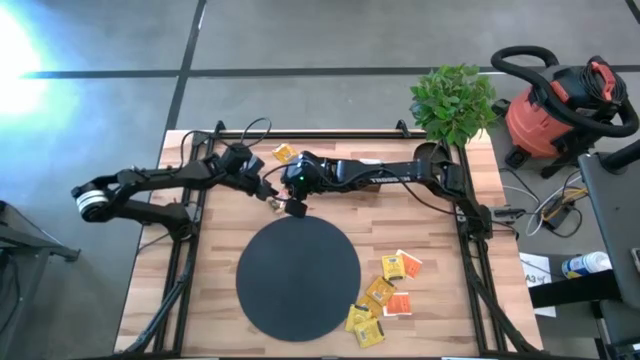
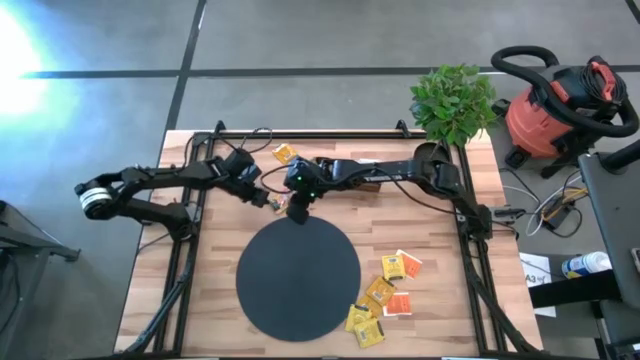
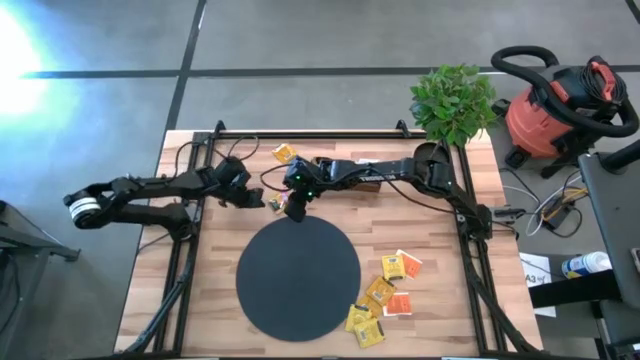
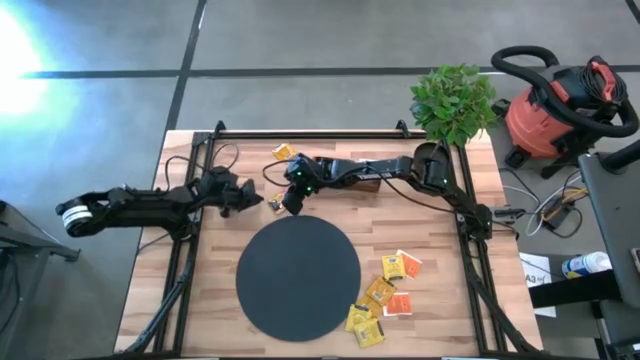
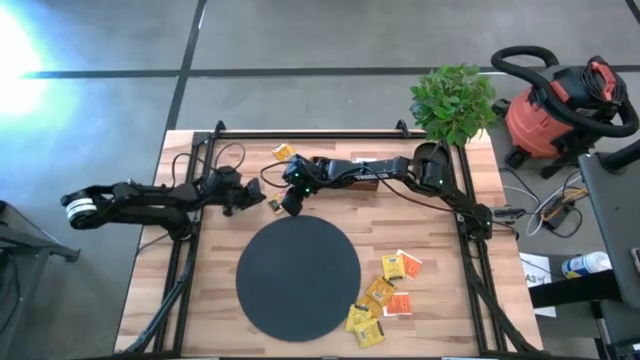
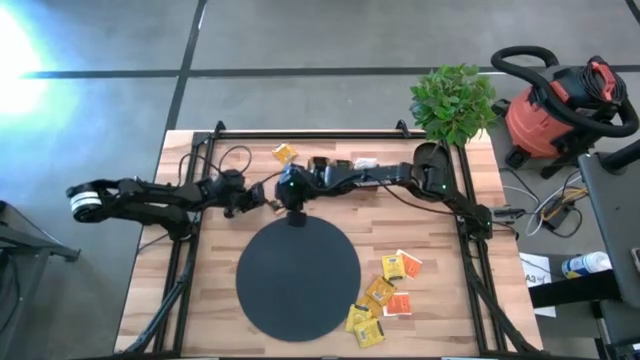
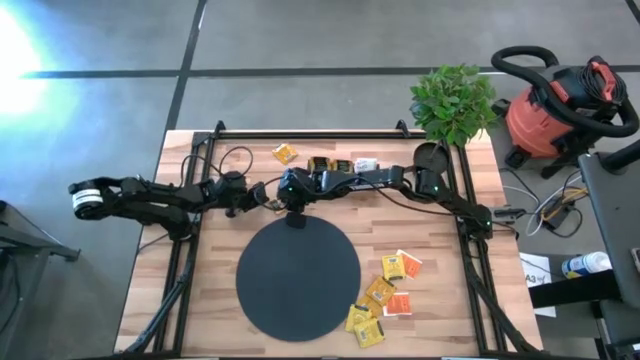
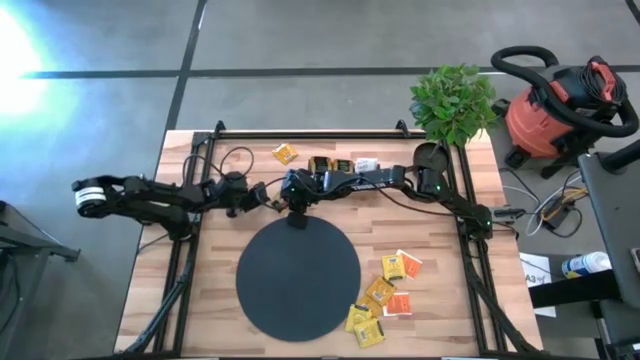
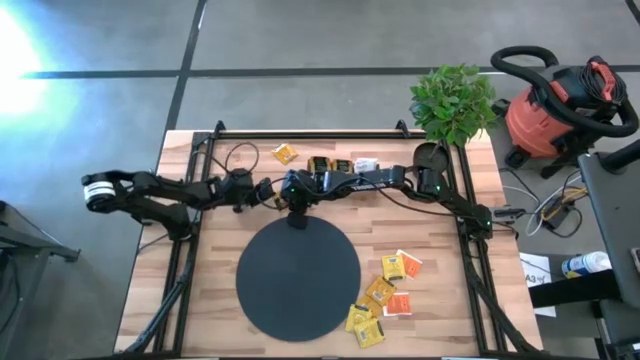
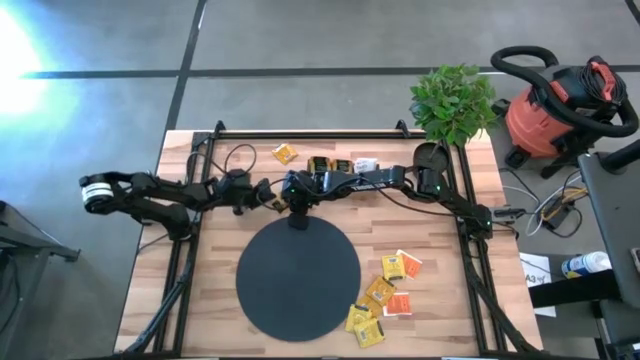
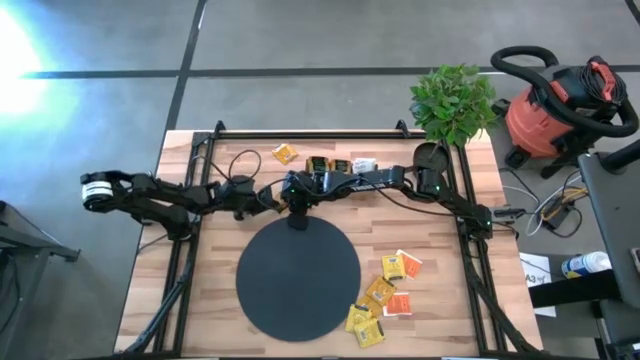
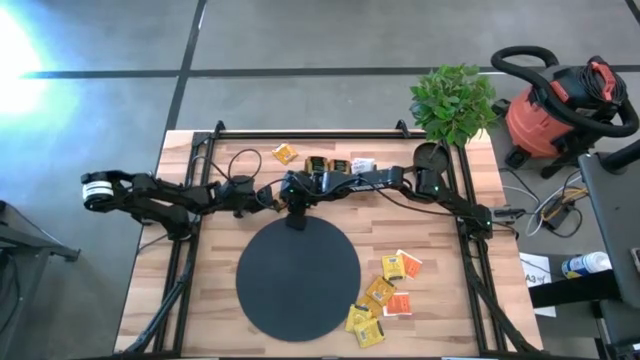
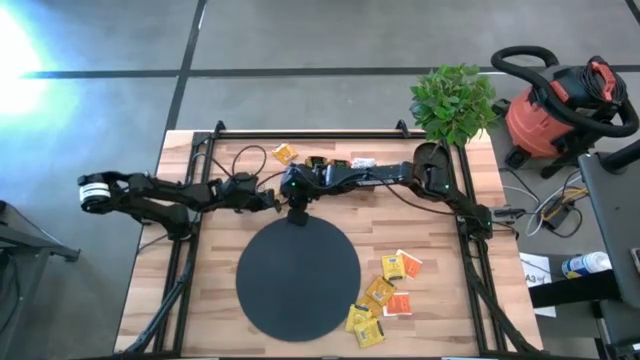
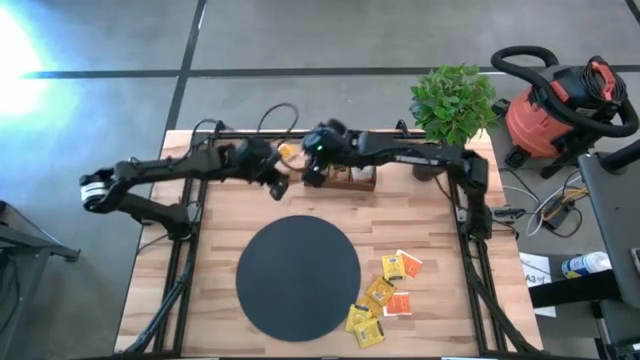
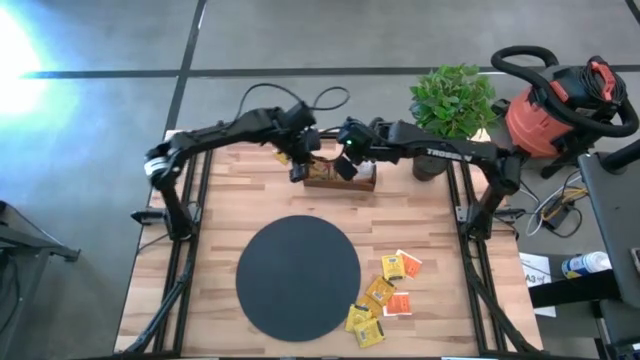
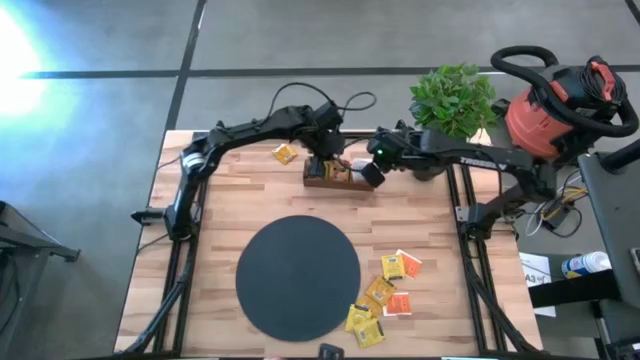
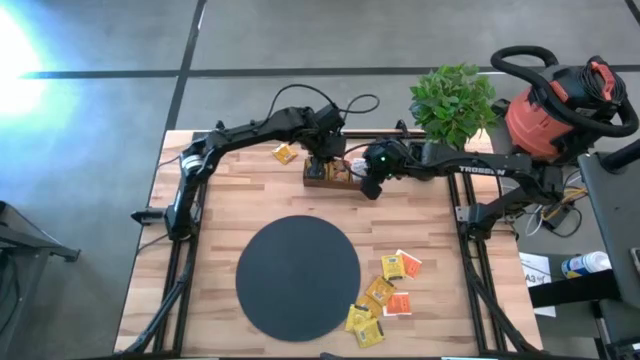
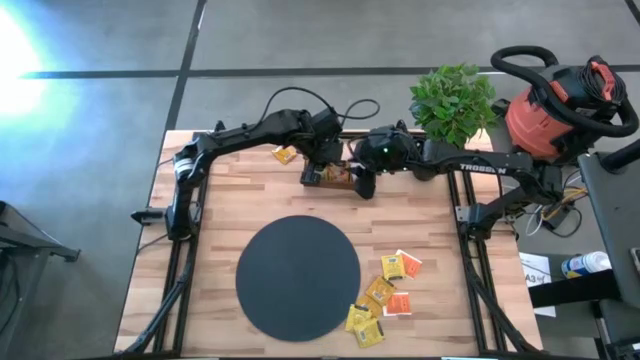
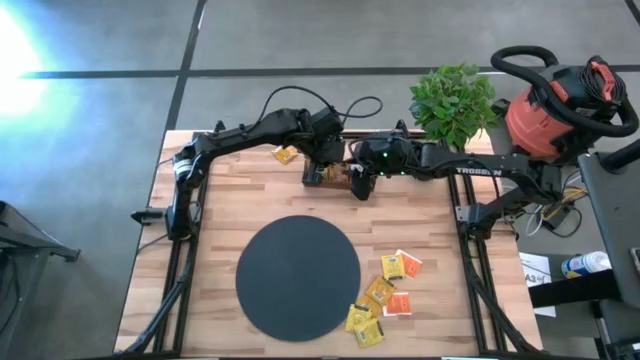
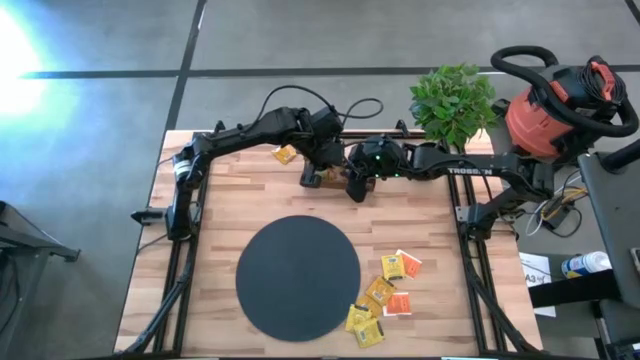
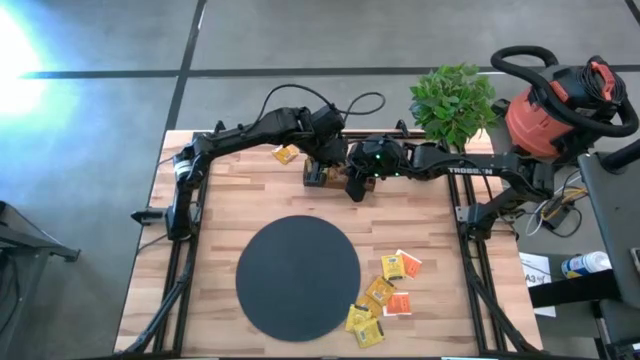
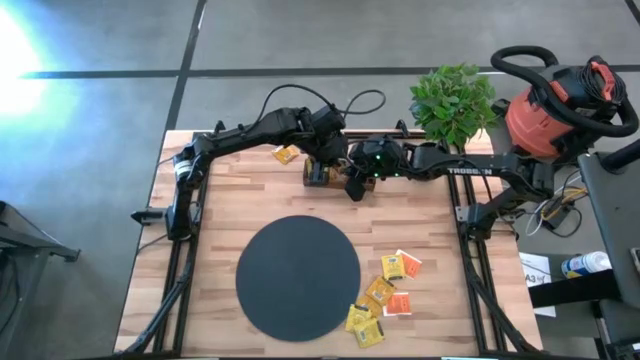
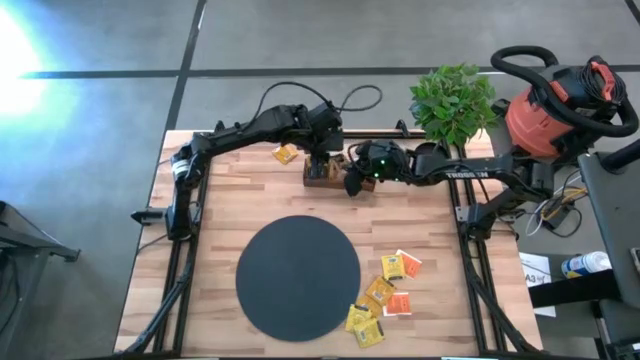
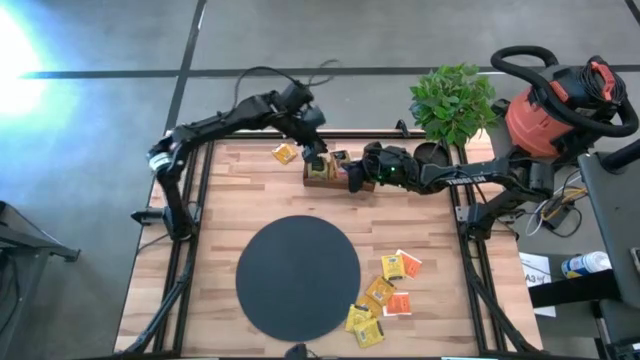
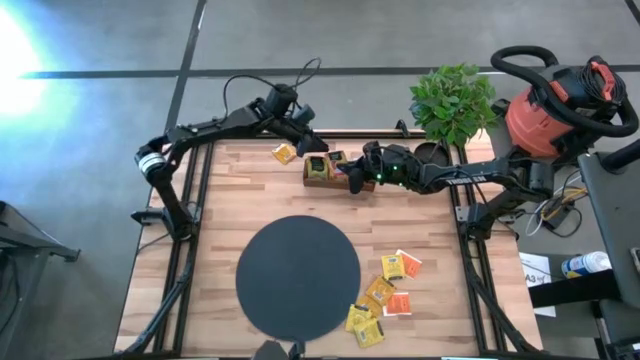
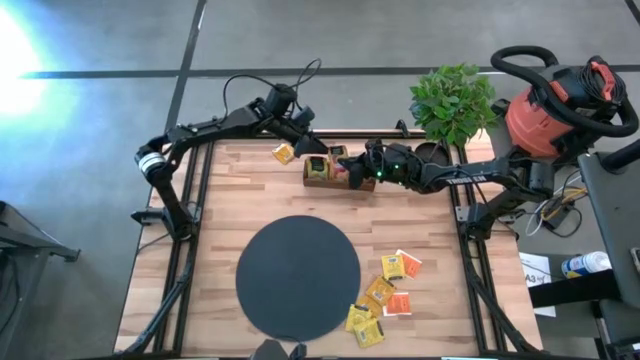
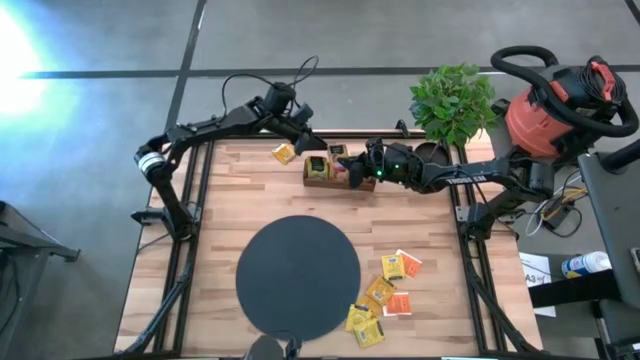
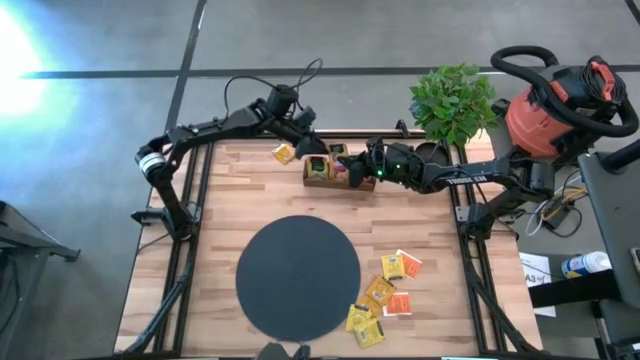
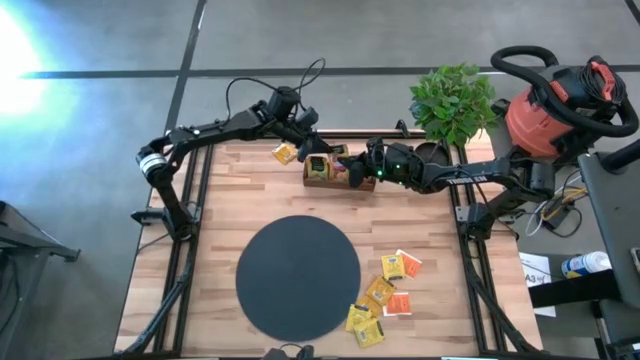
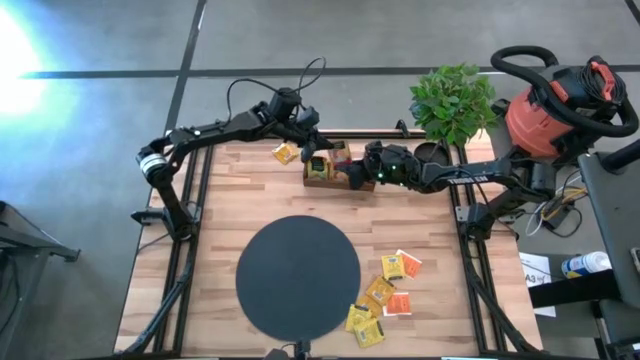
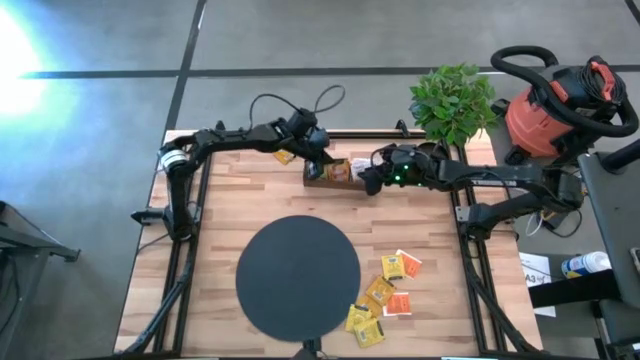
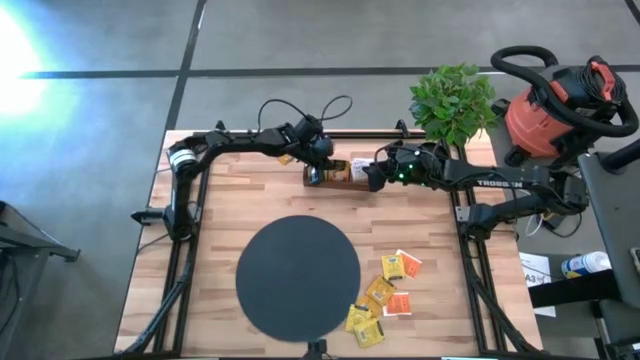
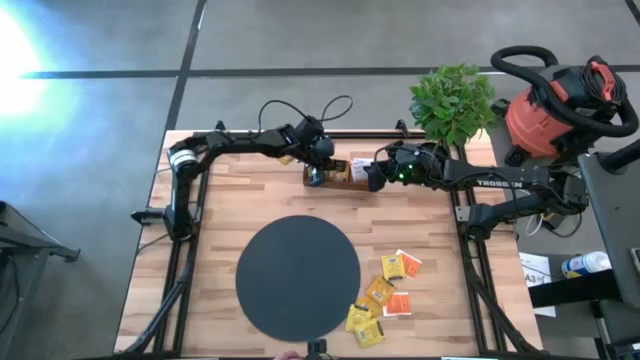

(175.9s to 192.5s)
Task: Pick & Place Tea
Put the orange tea bag into the middle section of the wooden organizer

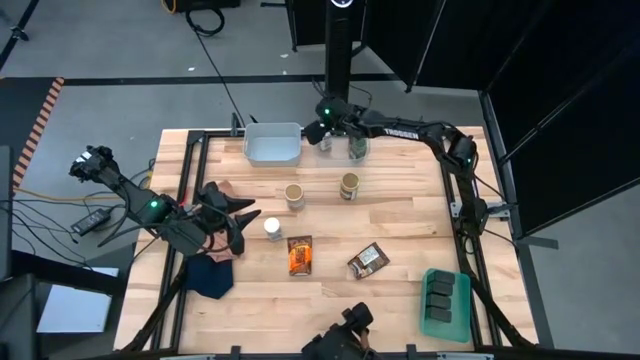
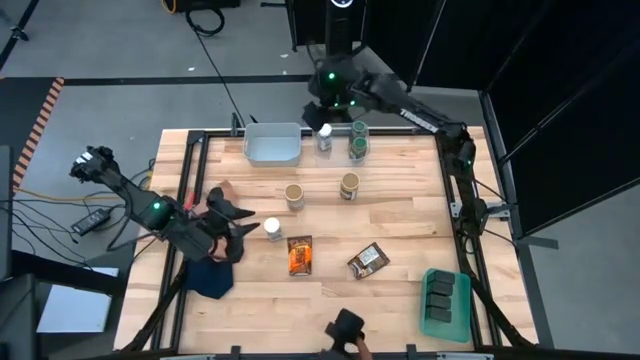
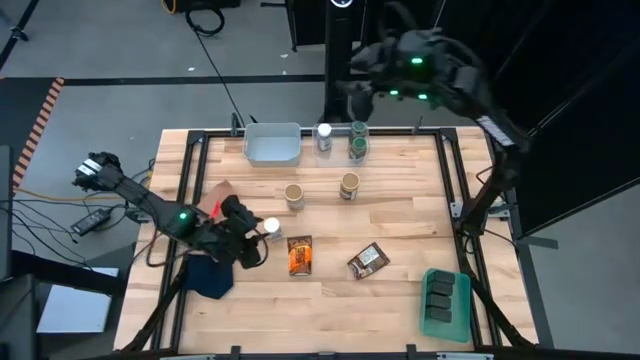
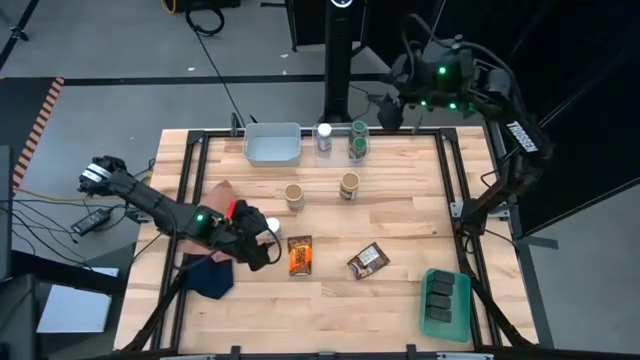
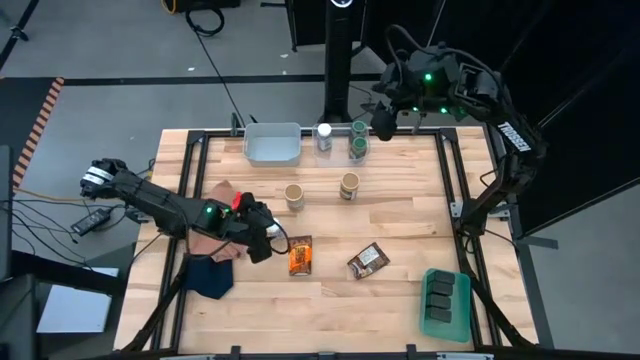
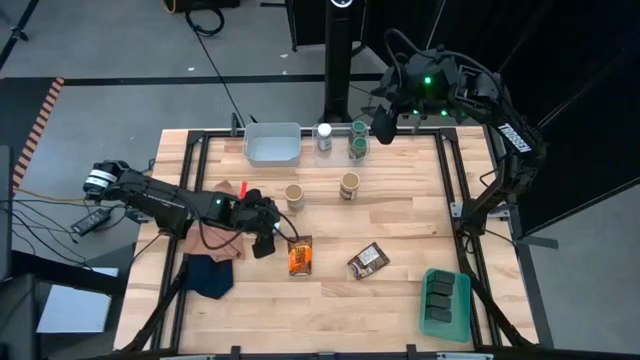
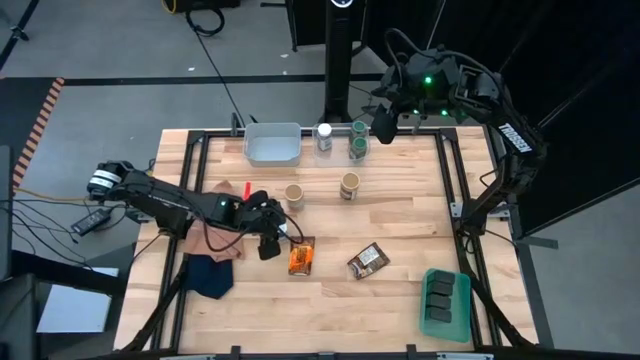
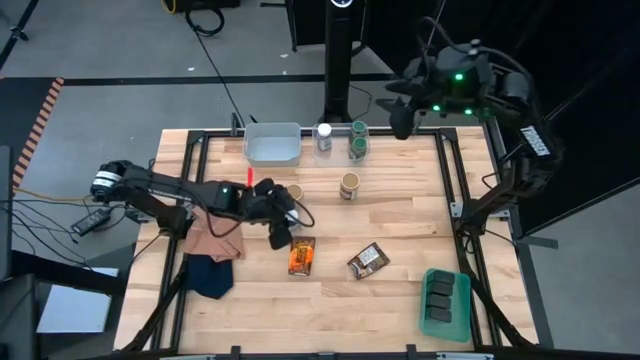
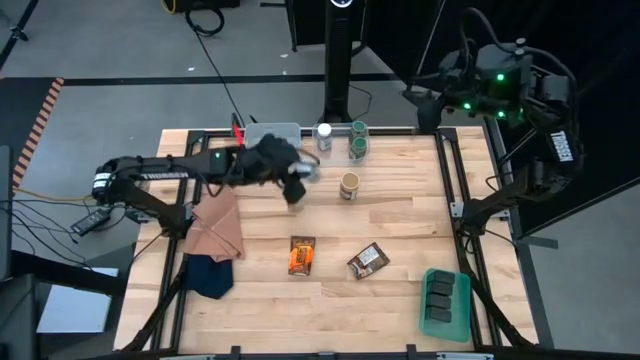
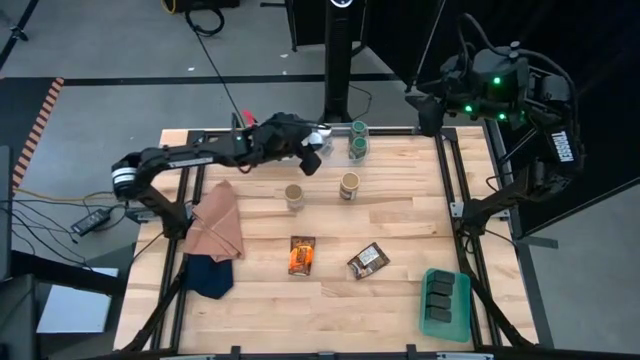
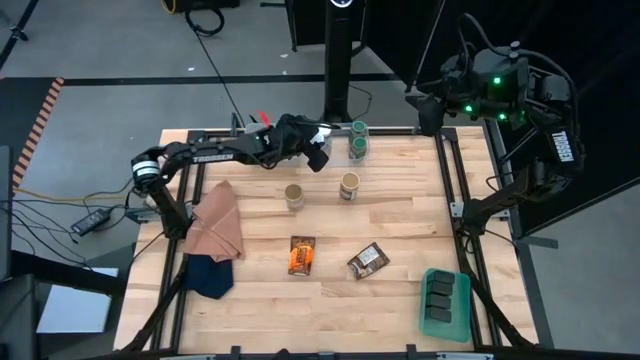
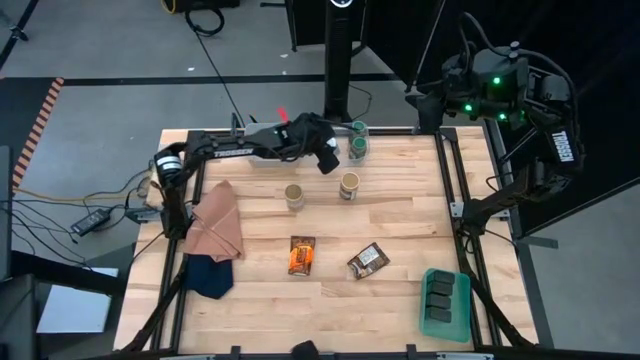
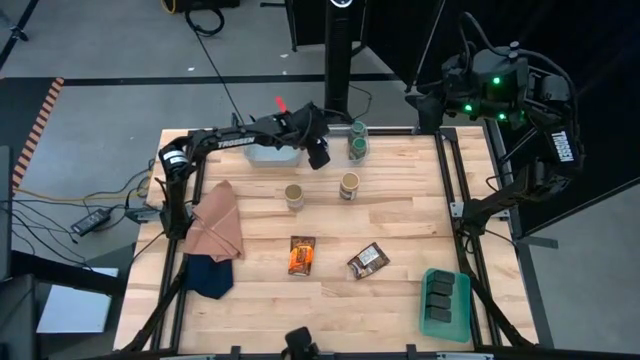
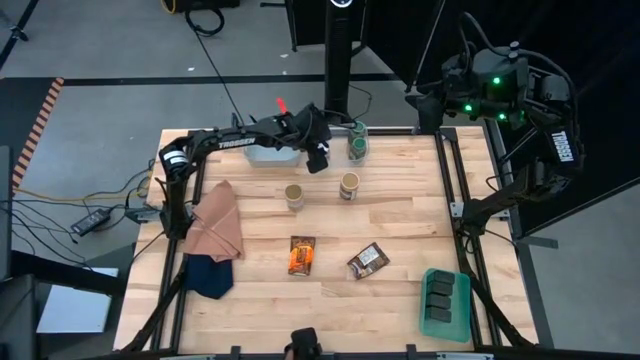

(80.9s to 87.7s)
Task: Sort spices by type
Put the white seasoning bottle into the transparent bin
